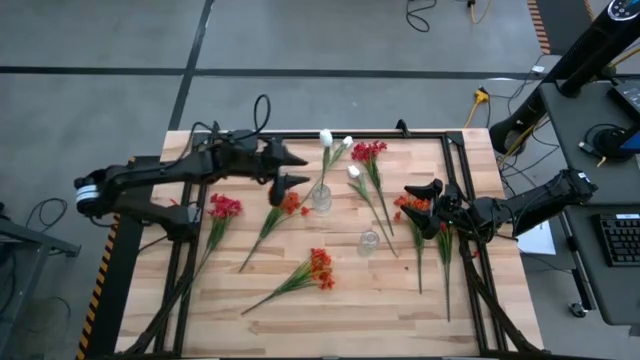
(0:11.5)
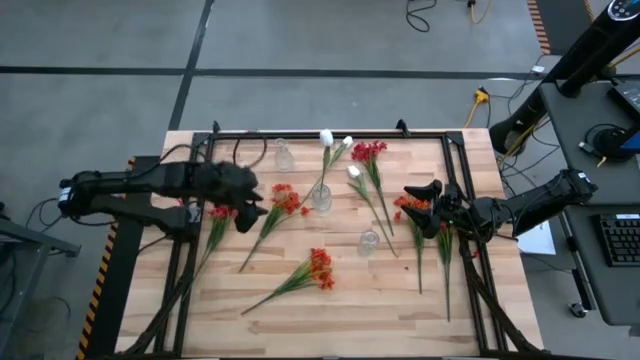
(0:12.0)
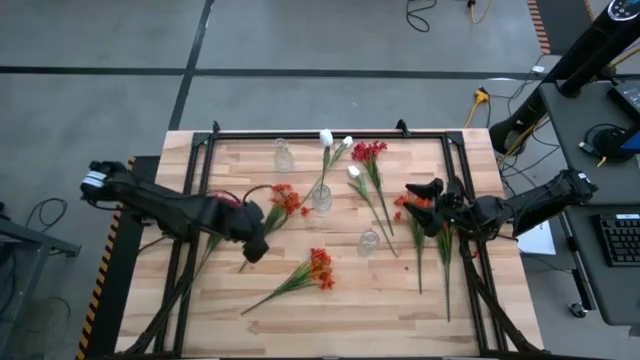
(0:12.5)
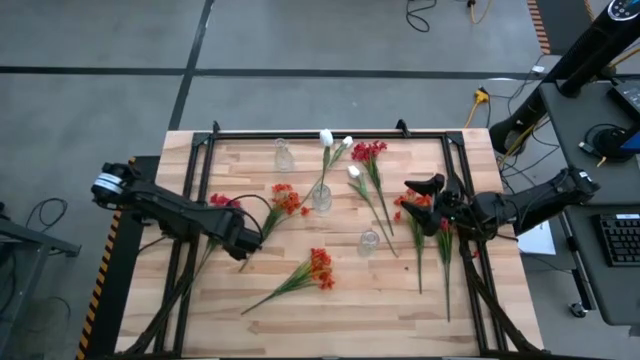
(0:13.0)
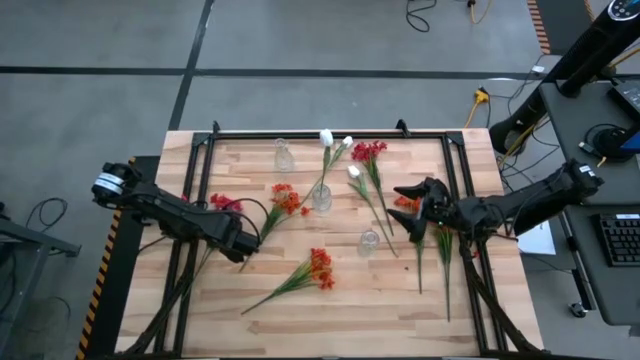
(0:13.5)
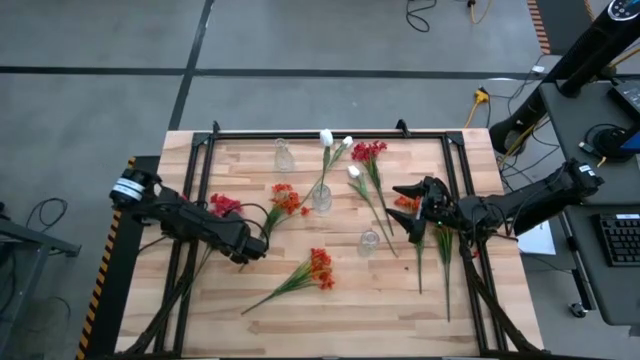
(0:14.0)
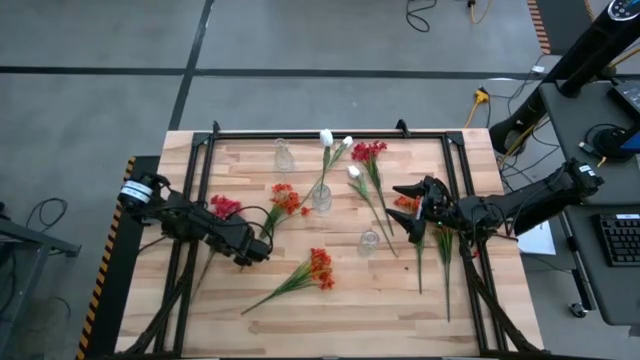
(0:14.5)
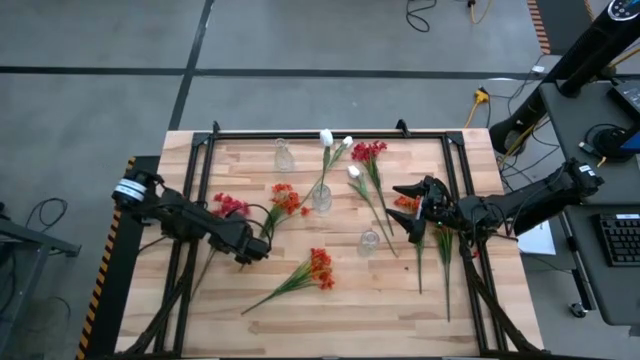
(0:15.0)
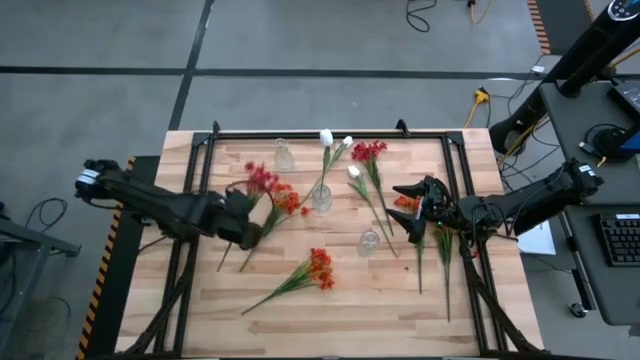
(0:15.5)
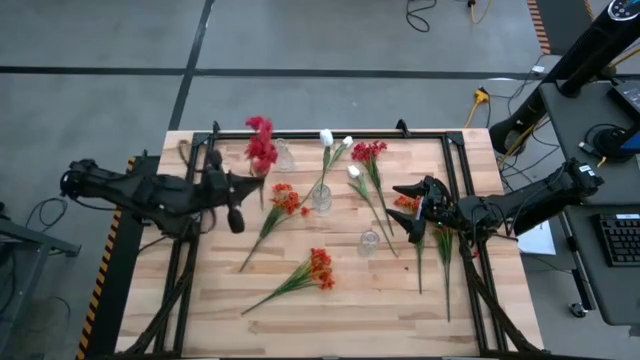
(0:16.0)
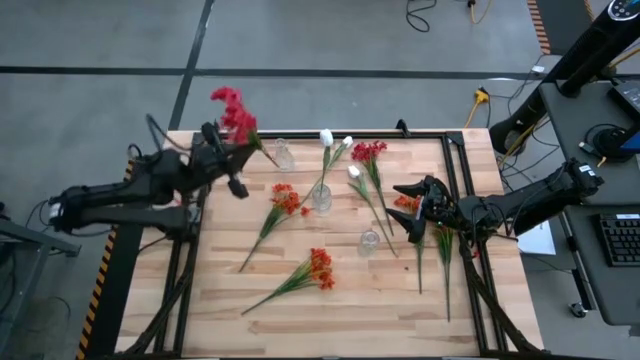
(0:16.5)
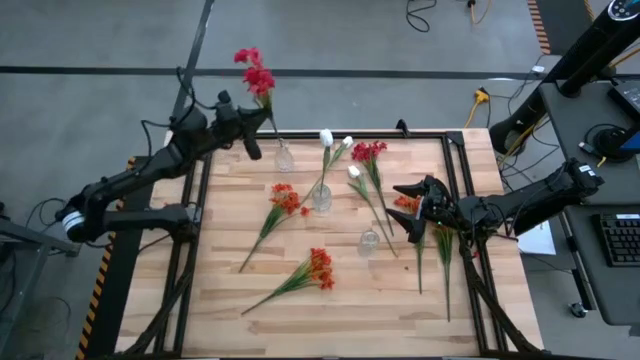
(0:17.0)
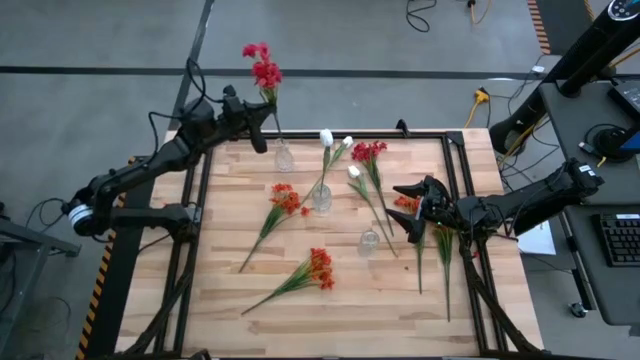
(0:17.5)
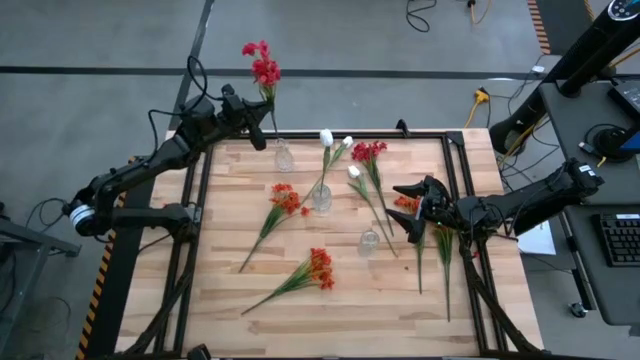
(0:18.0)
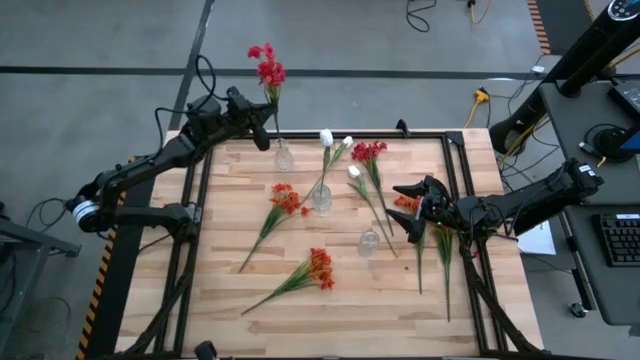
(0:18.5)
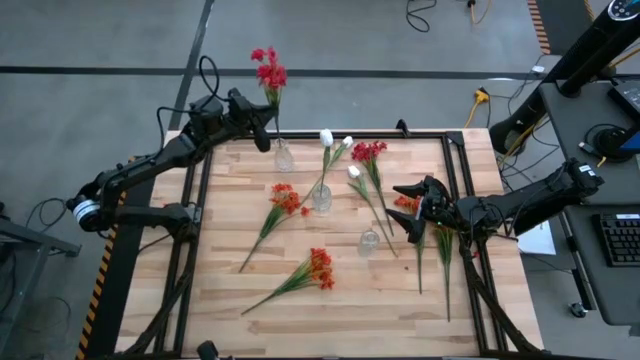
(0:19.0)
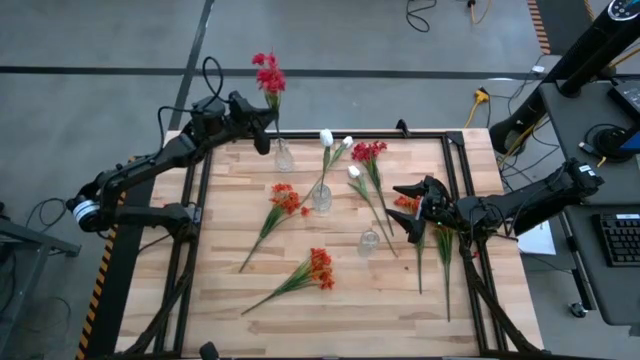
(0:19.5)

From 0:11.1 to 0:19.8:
Task: Sort flowers into vase by color
Put the middle left red sprig of flower into the top left transparent glass vase

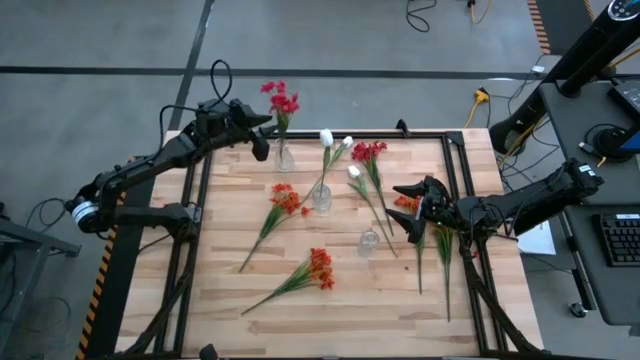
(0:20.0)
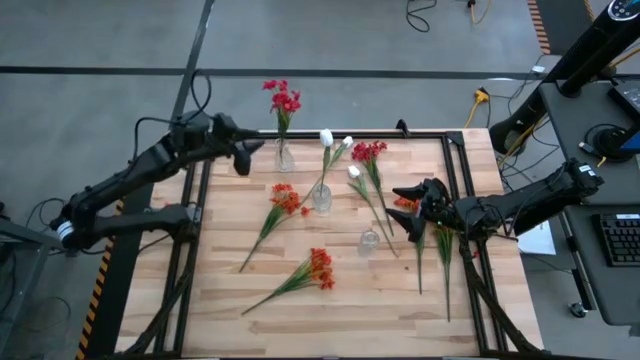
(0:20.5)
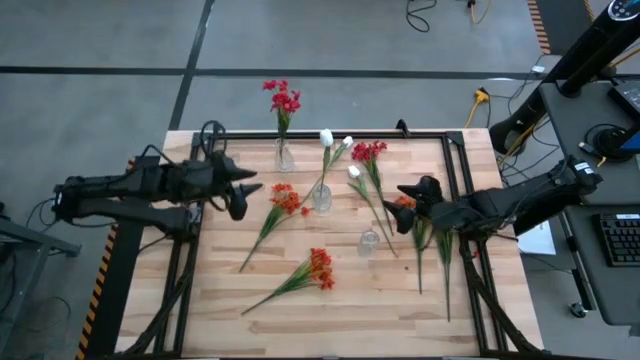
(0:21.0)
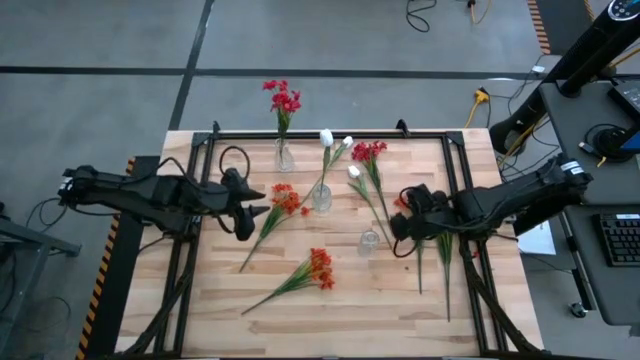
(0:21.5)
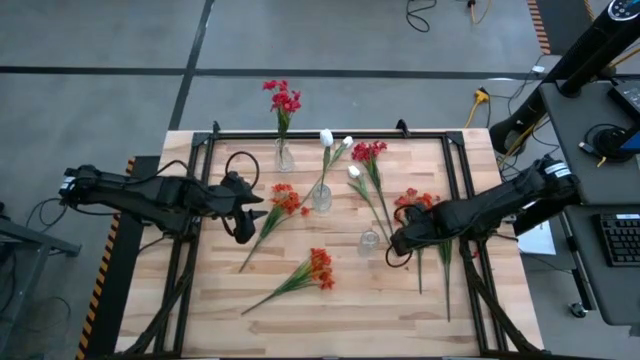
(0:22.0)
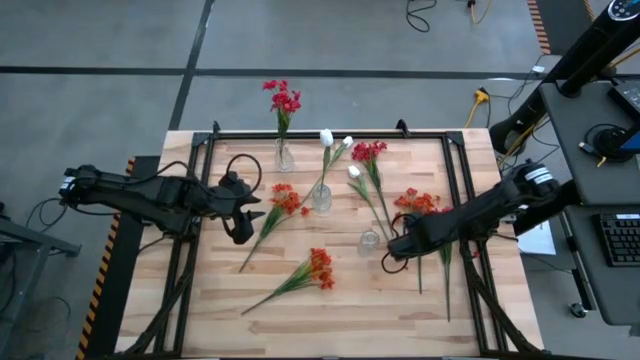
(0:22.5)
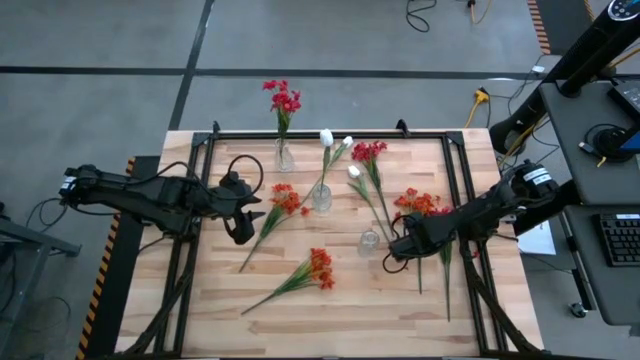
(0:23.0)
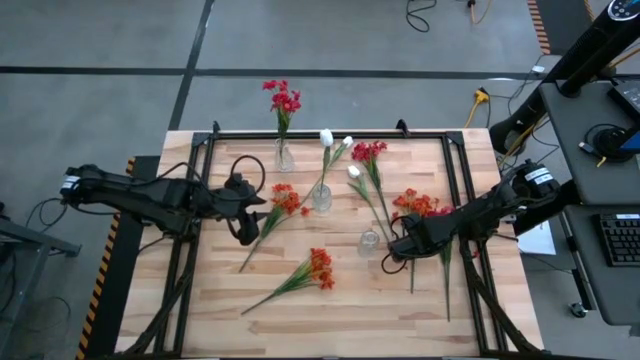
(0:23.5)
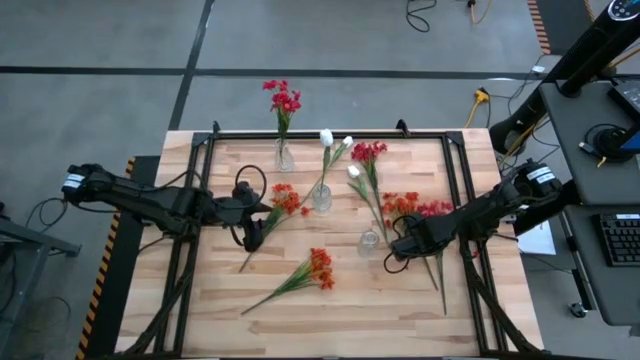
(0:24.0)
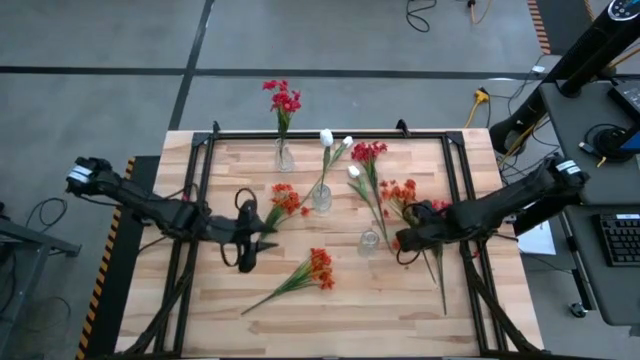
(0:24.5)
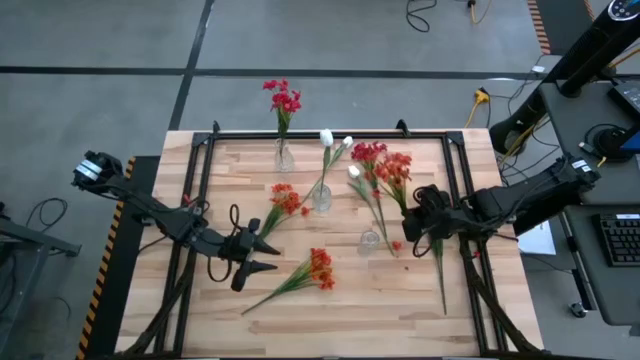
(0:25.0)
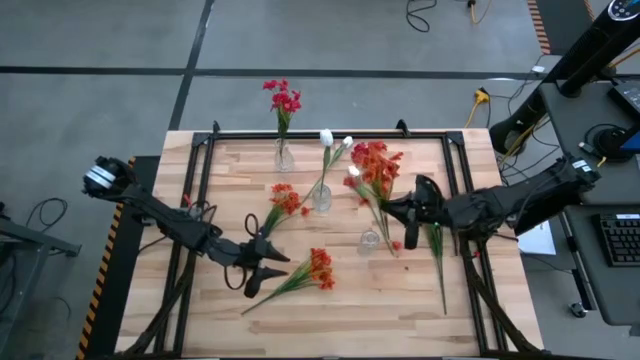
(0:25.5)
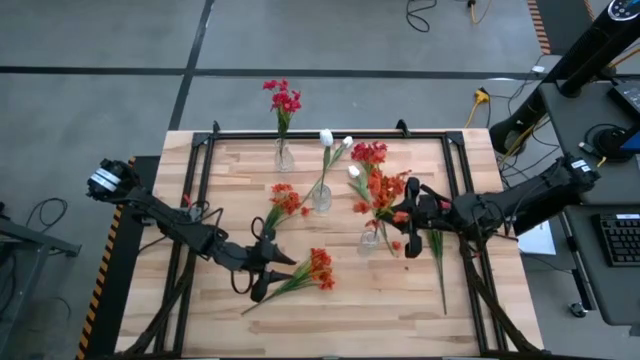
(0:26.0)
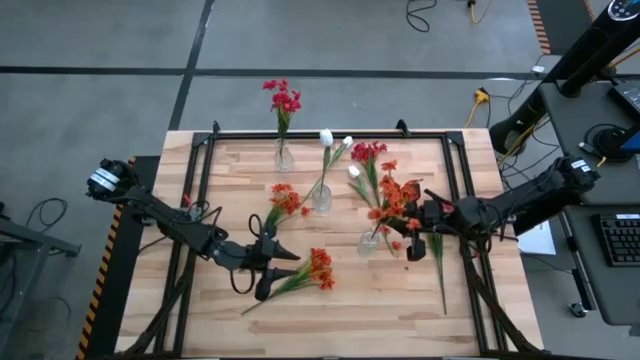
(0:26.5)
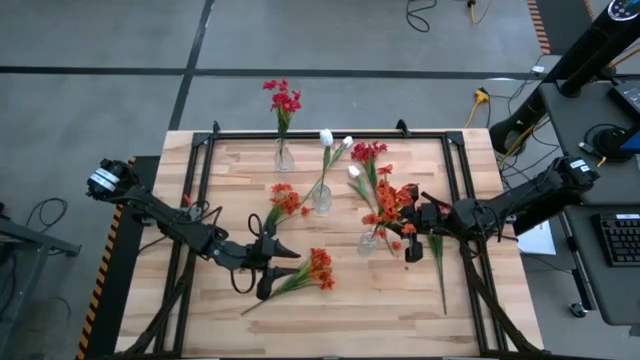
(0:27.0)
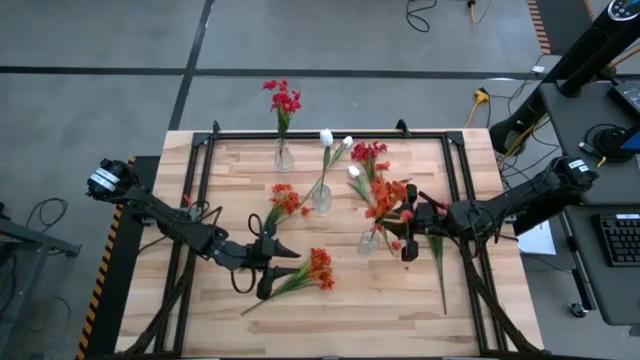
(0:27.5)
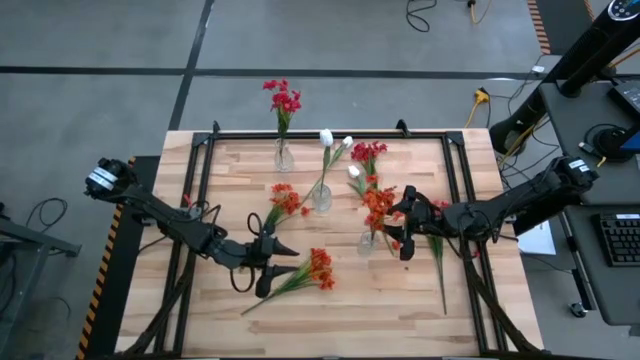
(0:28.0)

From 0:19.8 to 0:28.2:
Put the middle right orange sprig flower into the bottom right transparent glass vase

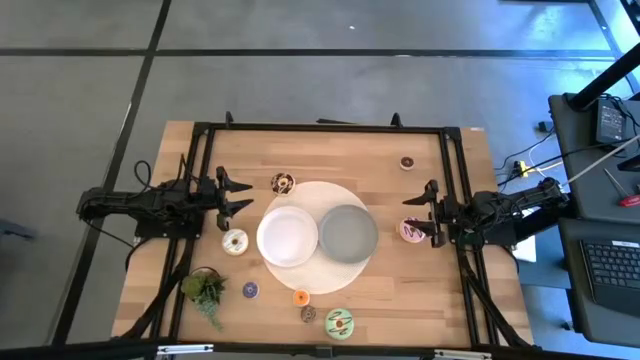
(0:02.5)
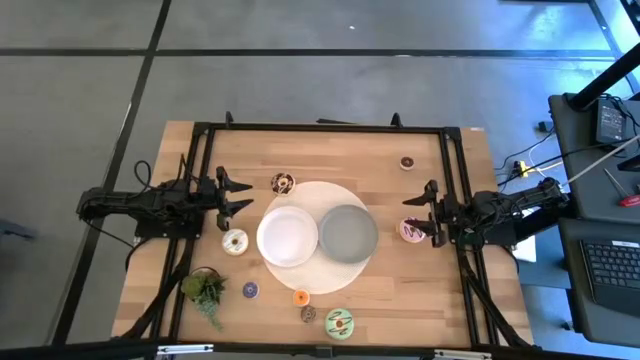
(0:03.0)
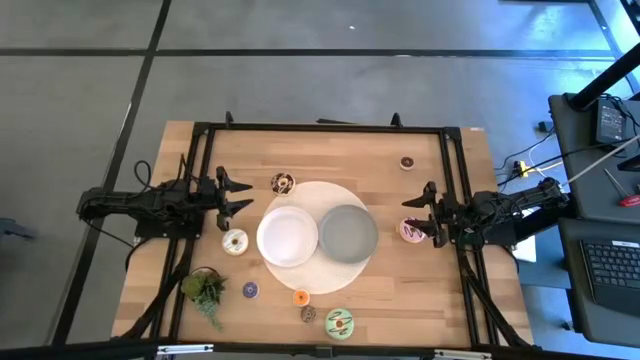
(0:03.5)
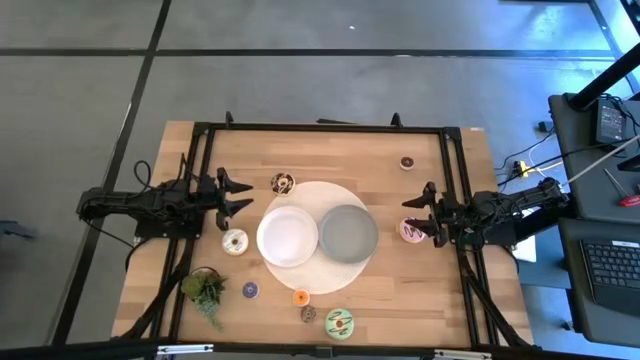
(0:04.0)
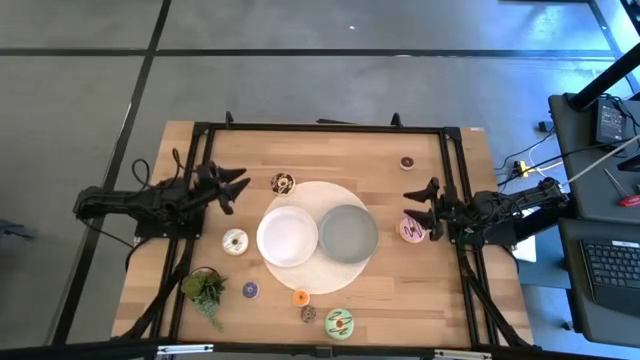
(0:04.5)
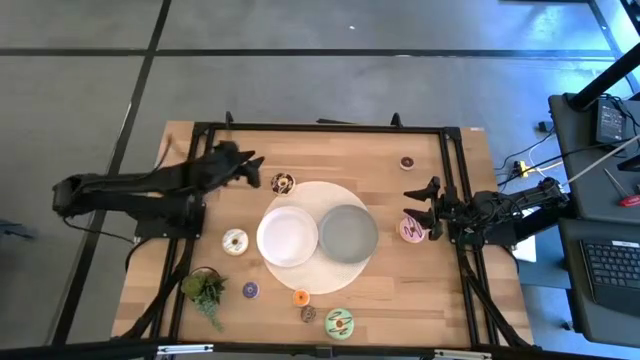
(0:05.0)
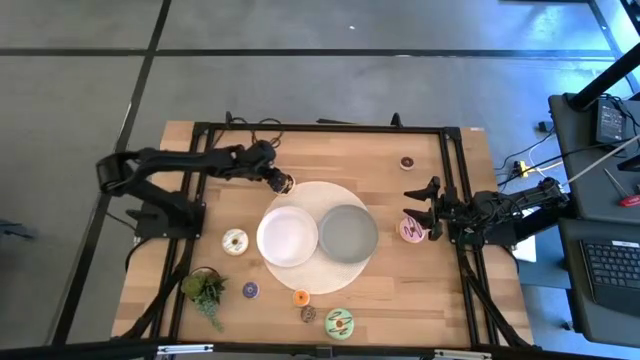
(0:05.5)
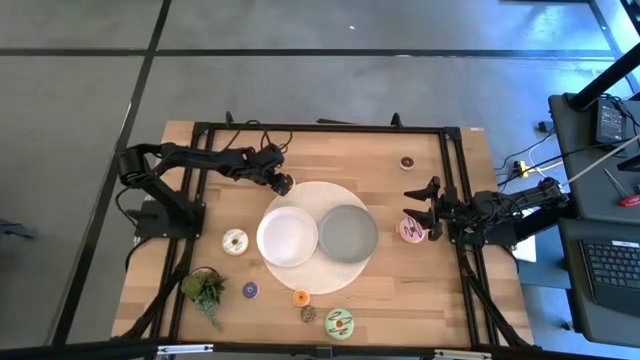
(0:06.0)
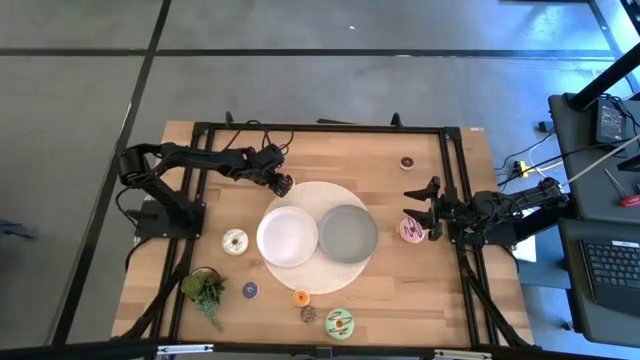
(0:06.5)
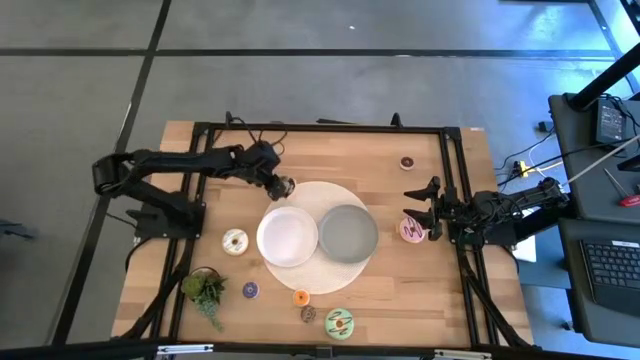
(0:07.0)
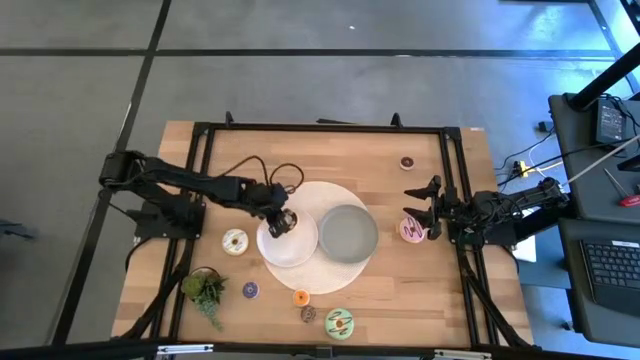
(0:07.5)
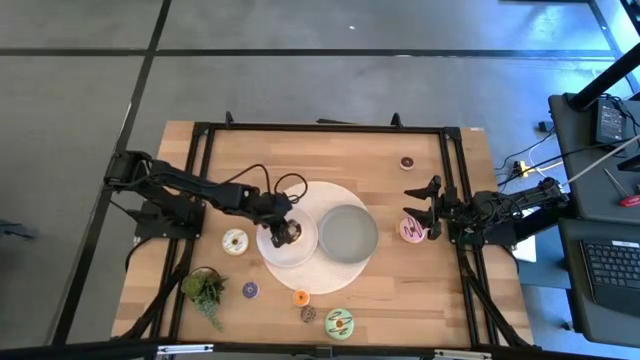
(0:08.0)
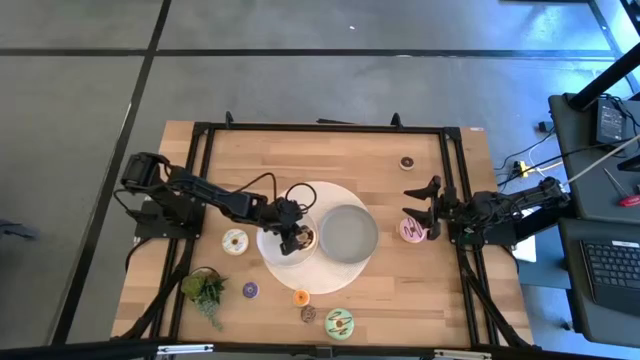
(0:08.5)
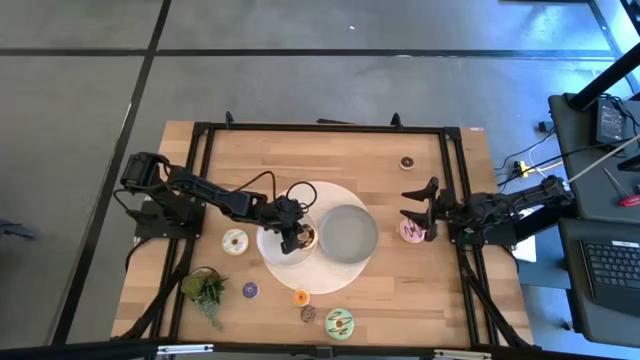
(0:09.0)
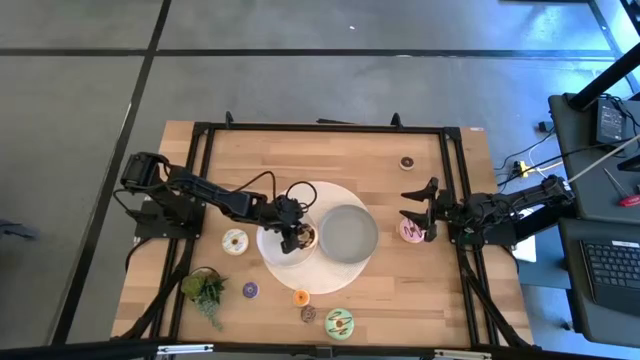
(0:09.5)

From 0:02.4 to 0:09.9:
Task: Pick & Place donuts
Put the big black donut on the white plate
